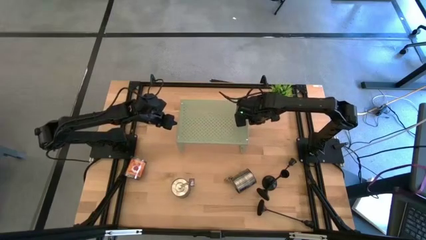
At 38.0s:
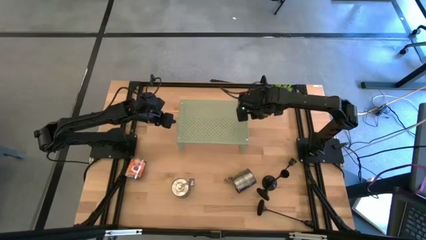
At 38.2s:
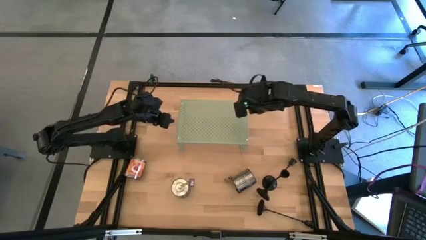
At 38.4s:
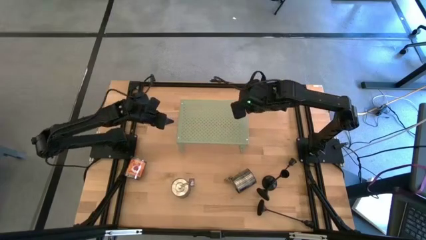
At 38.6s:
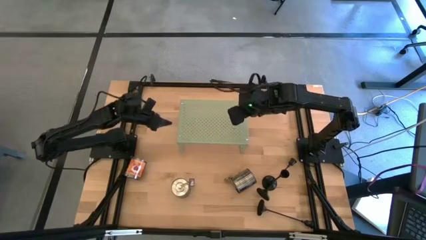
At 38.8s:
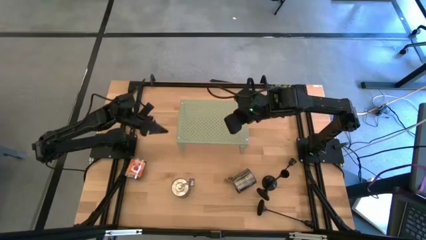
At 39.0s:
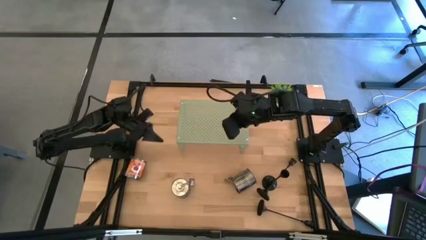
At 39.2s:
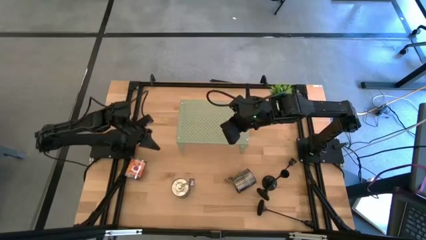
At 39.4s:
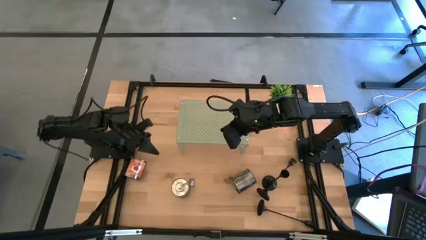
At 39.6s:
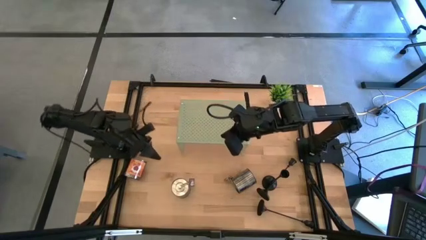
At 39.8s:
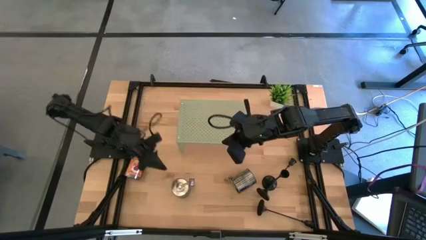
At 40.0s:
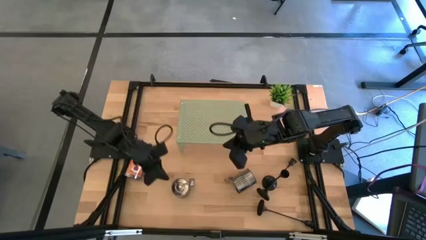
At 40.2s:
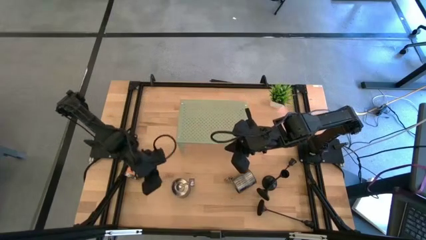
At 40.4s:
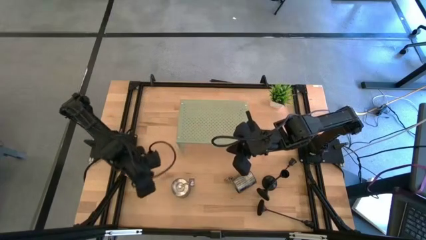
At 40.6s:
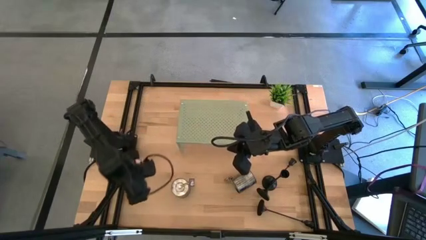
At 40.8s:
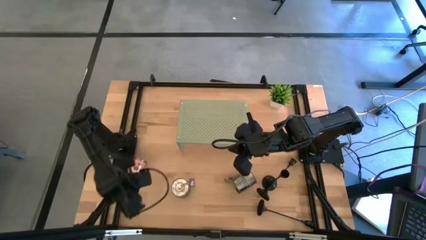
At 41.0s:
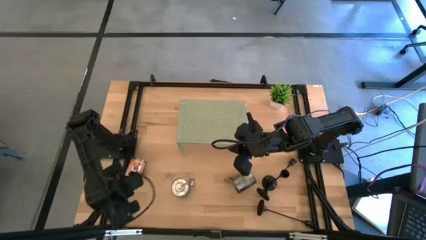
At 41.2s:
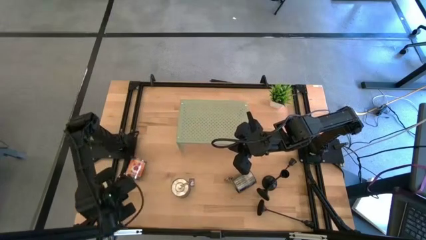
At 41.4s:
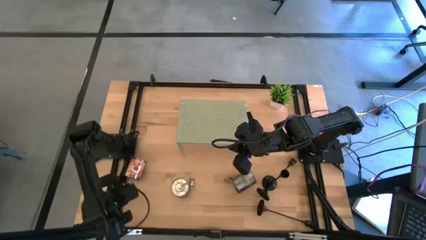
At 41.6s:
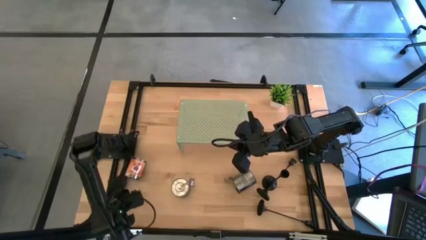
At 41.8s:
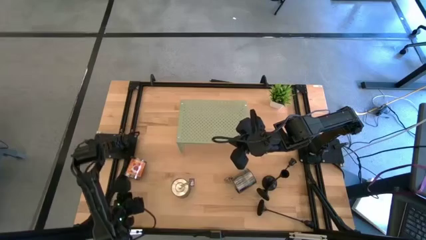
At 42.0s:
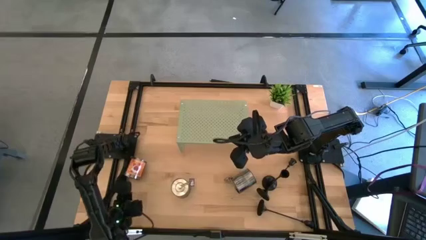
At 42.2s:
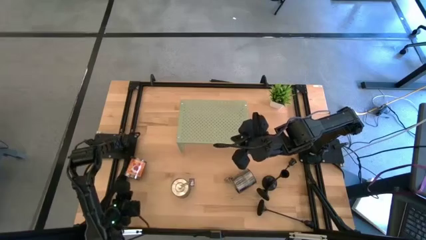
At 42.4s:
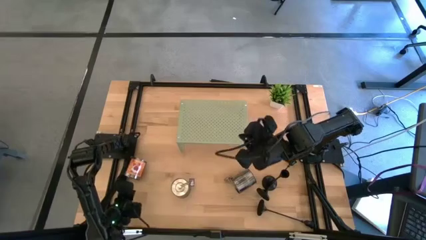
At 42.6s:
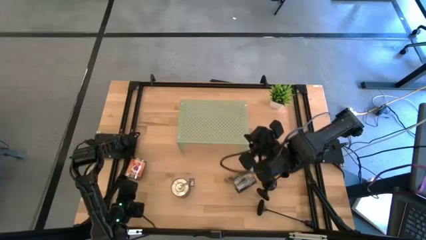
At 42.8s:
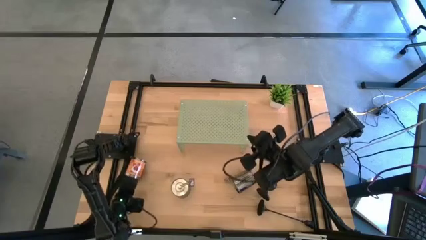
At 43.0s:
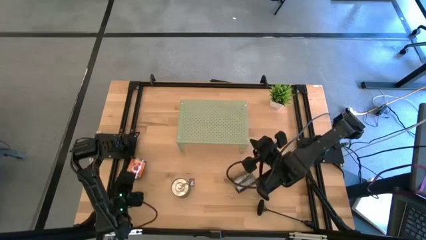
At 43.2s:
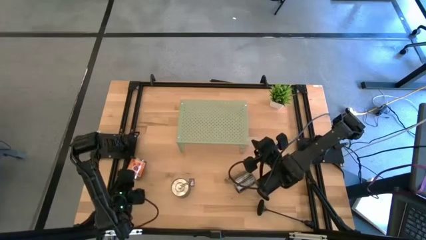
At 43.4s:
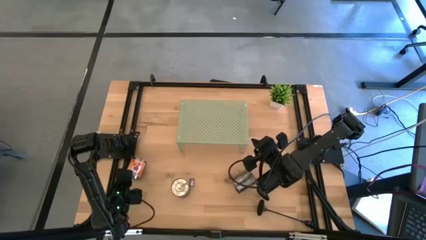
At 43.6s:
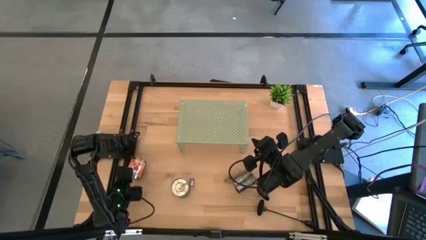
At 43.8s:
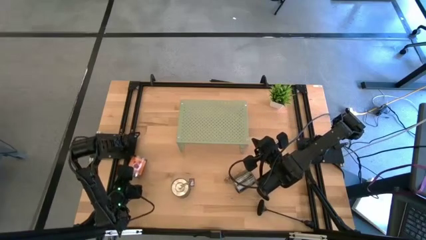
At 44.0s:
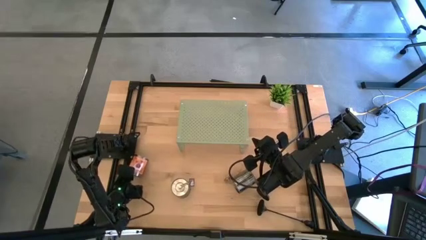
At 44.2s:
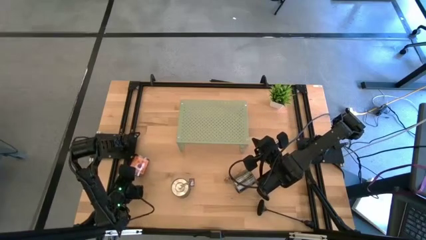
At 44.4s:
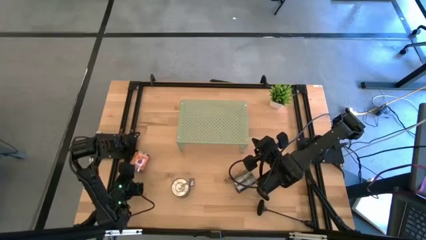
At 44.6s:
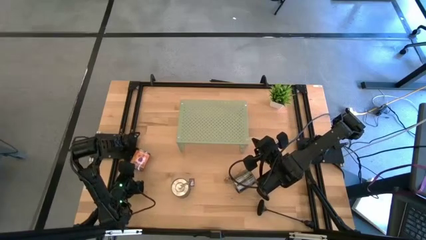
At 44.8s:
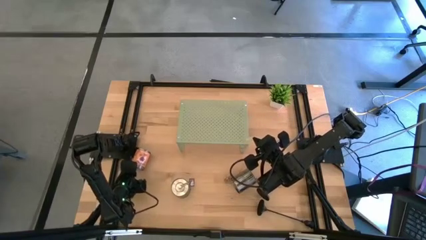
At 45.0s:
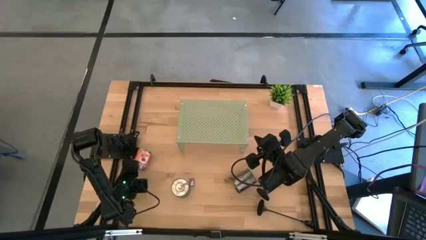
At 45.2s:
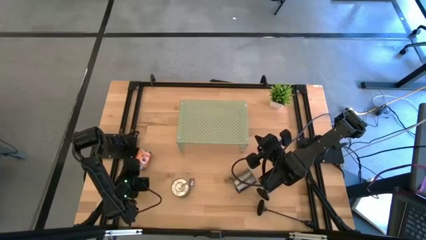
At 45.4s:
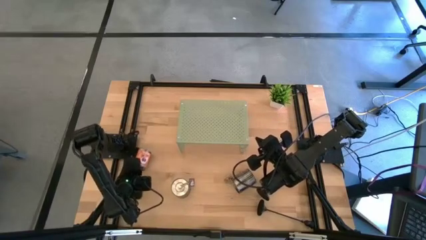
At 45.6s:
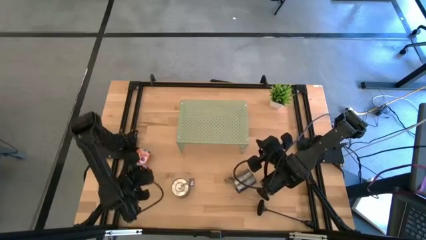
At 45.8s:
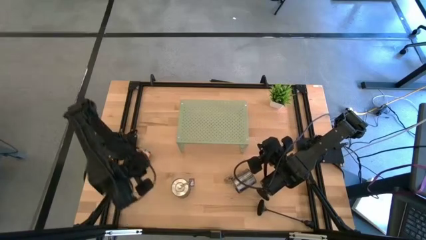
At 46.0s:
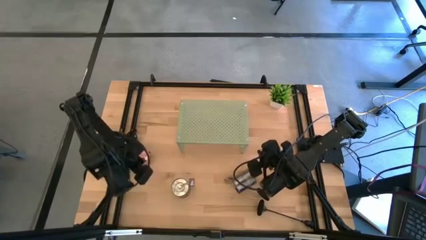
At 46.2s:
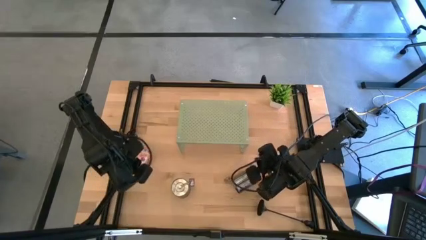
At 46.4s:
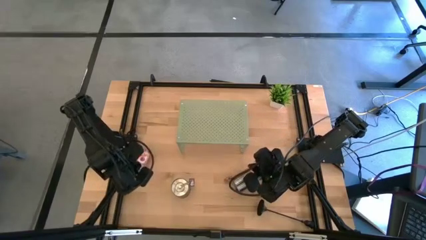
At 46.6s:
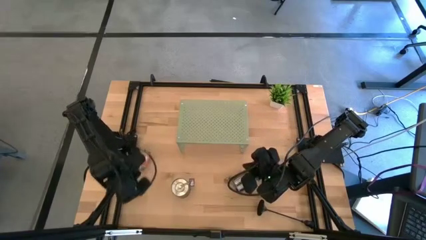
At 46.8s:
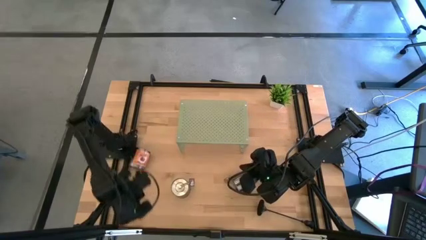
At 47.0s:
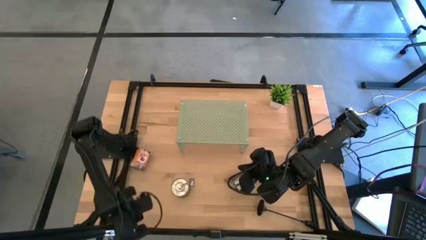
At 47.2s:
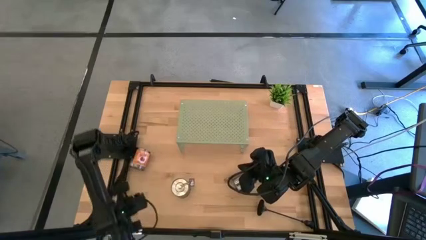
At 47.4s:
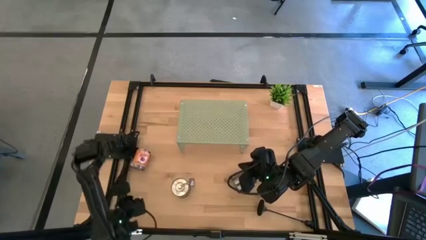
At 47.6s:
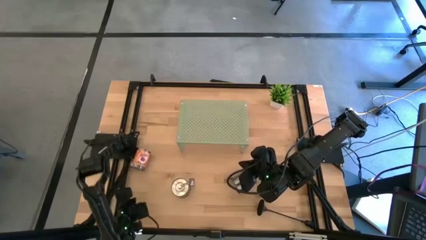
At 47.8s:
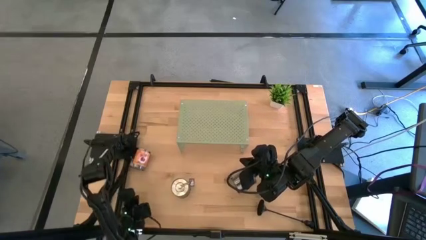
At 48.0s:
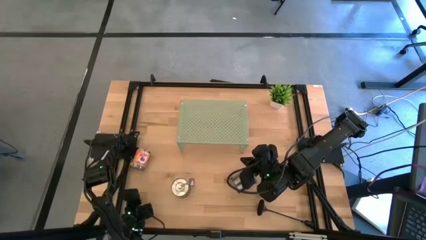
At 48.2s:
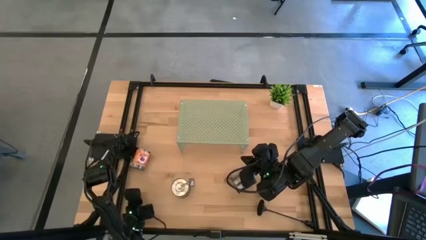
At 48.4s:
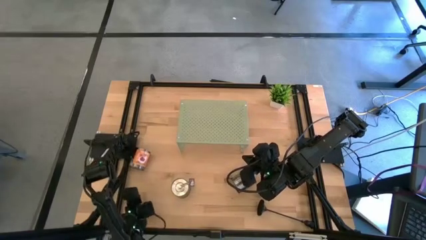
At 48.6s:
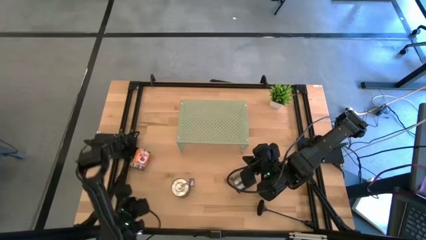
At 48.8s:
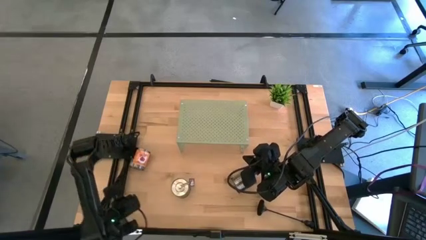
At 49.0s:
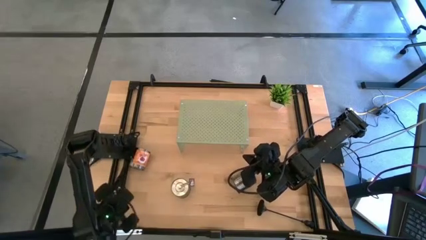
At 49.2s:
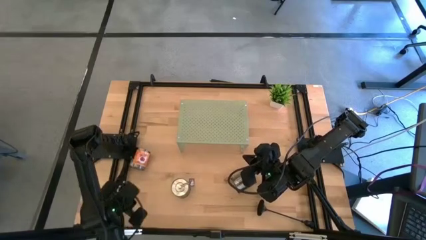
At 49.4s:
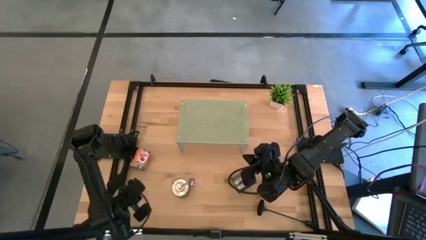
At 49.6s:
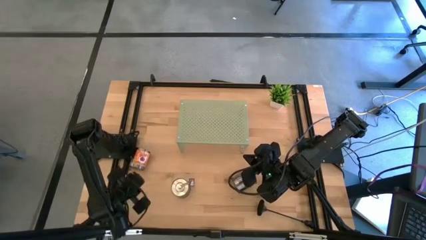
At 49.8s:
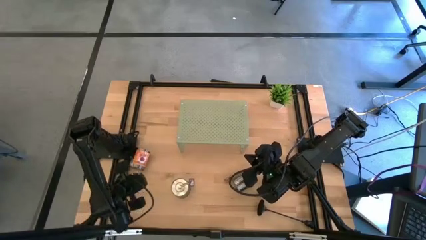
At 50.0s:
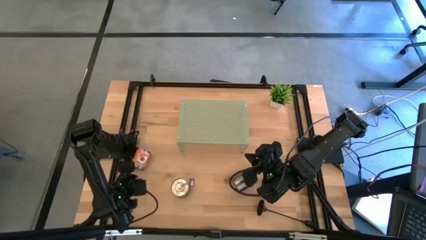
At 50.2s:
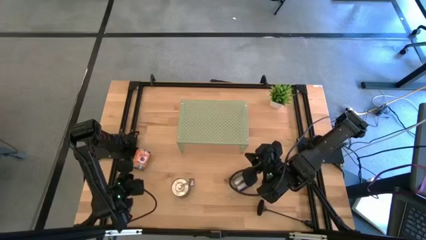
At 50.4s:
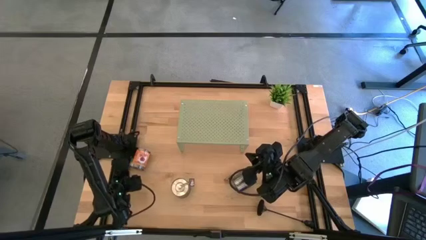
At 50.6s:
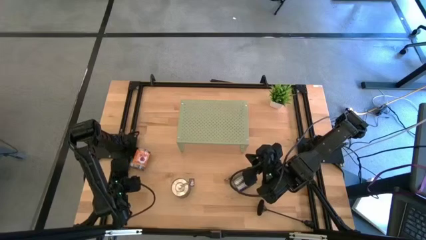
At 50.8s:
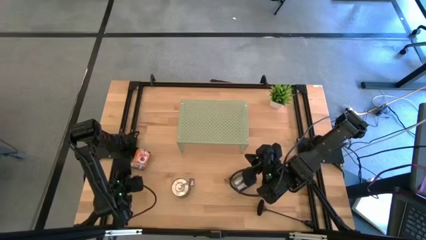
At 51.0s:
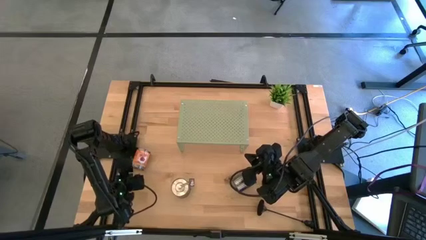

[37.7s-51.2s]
Task: Pick & Place candle stick holders
Put the orange scented candle on the shelf

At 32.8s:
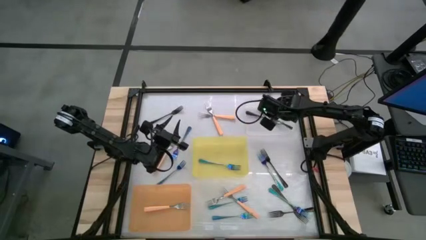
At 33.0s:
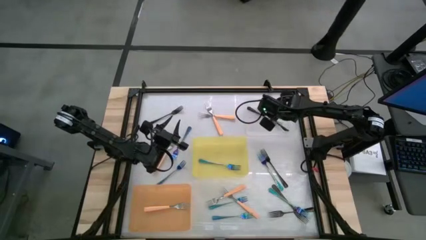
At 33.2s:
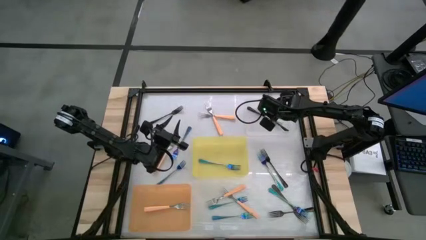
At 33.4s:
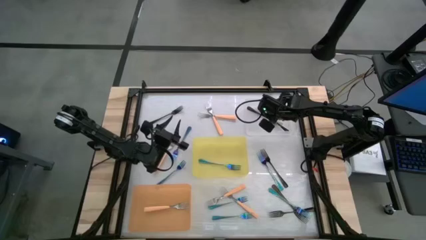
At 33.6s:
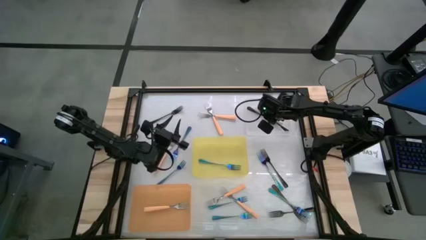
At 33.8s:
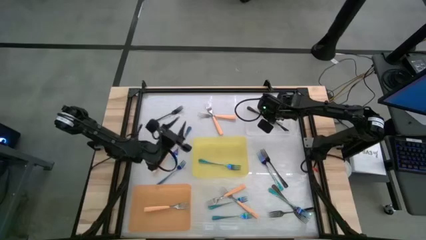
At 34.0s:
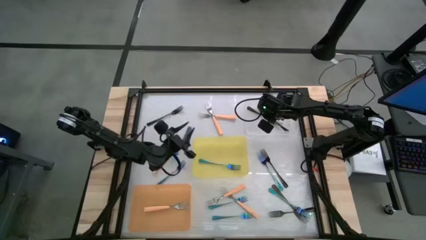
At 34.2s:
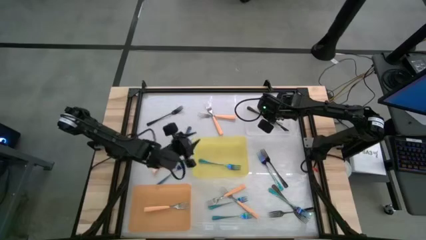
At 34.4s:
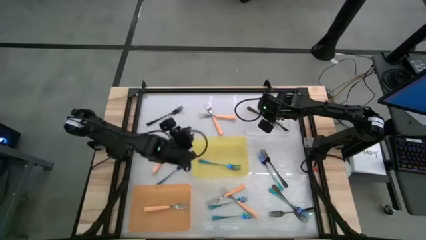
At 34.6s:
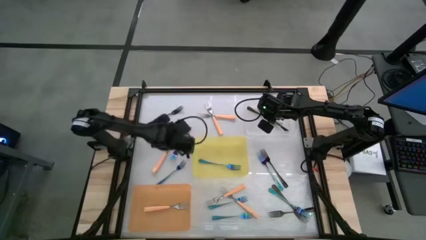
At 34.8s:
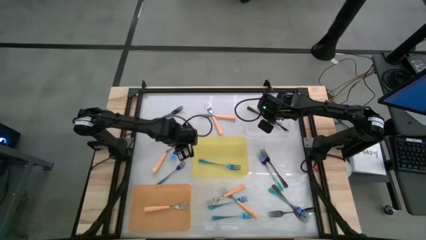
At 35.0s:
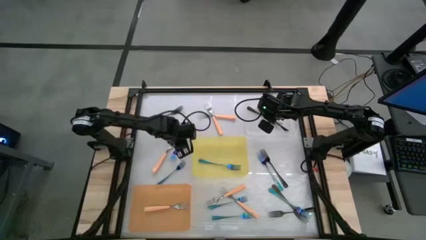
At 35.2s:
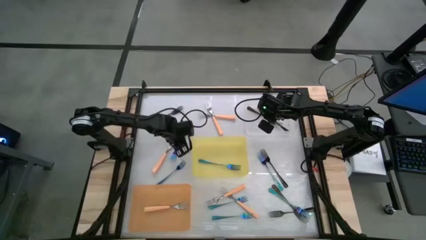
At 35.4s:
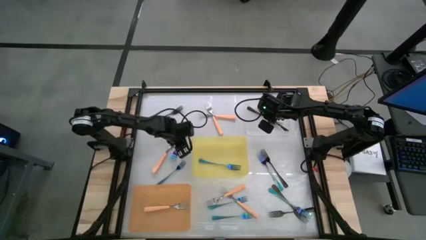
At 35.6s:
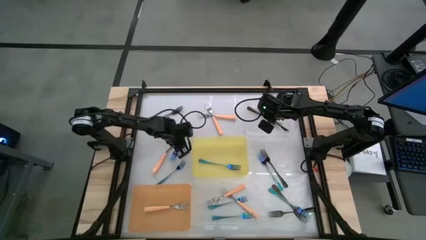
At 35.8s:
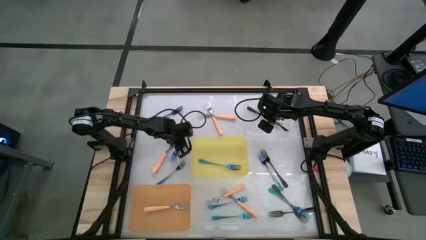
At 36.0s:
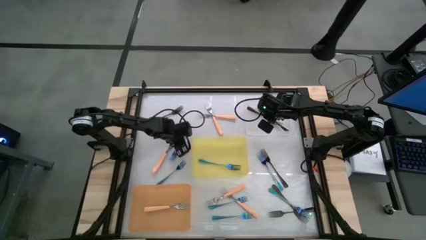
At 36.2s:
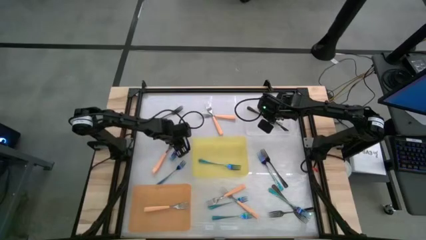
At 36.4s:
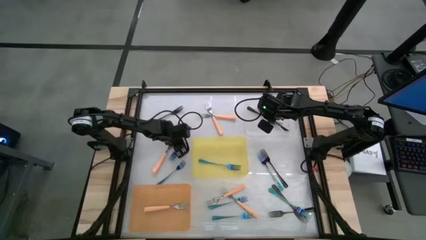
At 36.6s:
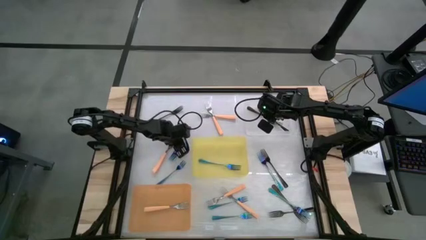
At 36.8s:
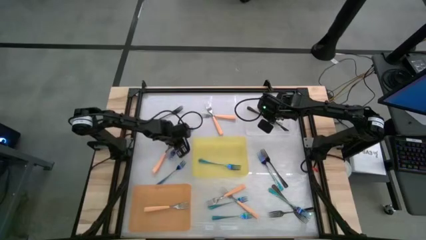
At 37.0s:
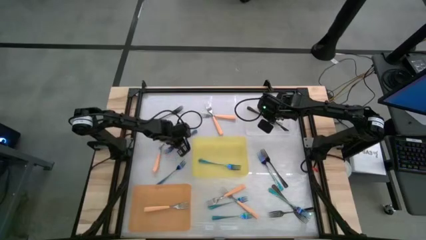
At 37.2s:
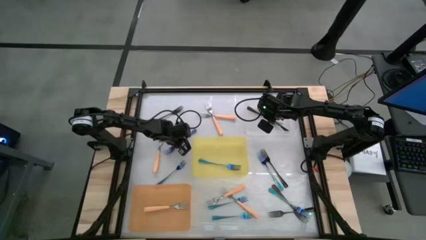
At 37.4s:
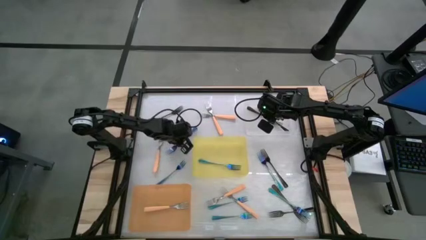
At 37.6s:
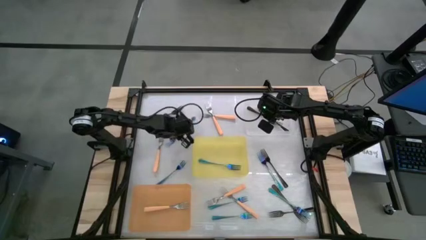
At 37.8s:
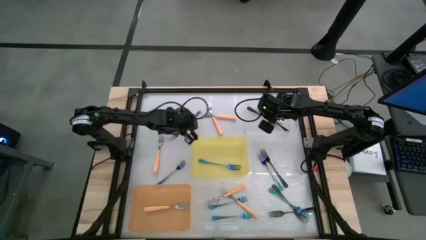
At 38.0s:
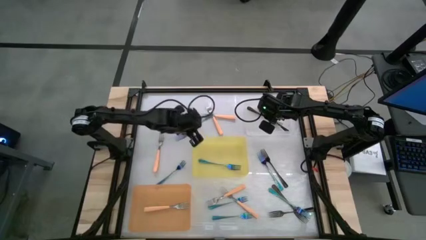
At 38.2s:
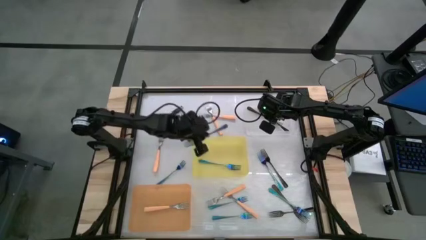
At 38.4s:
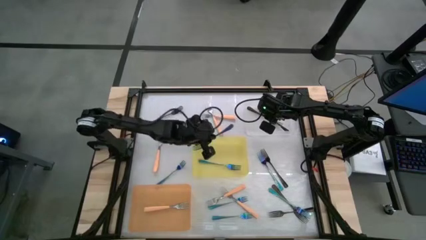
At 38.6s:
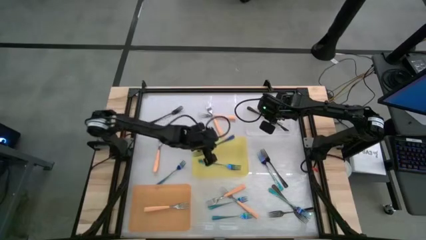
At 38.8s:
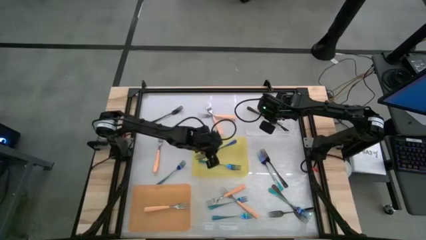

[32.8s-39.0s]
Task: Sort silverware by color (type)
Put the blue fork into the yellow bin
